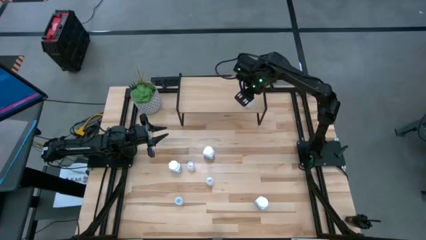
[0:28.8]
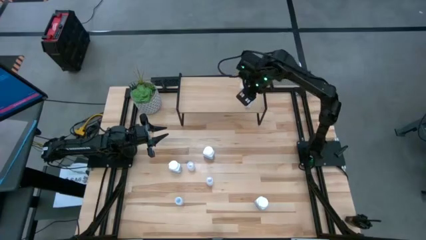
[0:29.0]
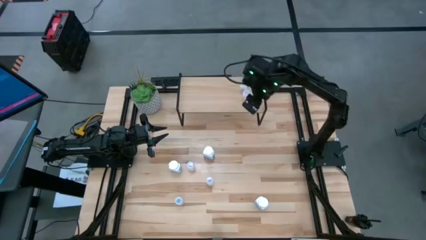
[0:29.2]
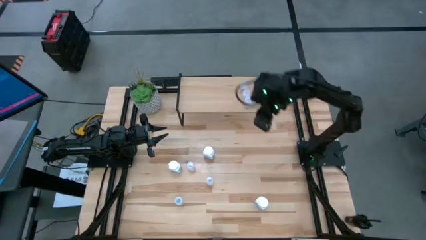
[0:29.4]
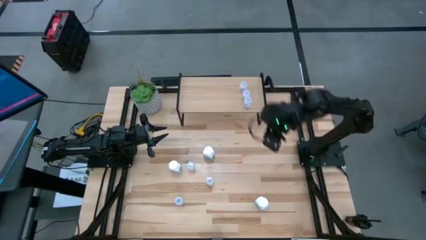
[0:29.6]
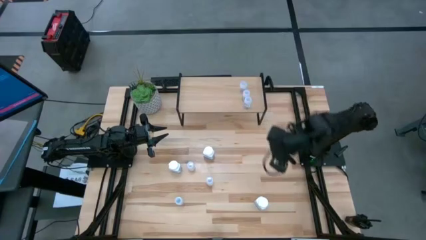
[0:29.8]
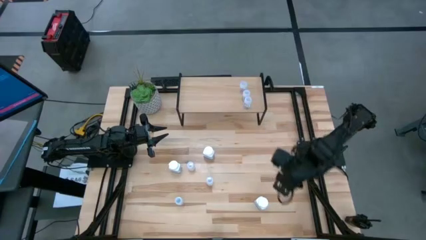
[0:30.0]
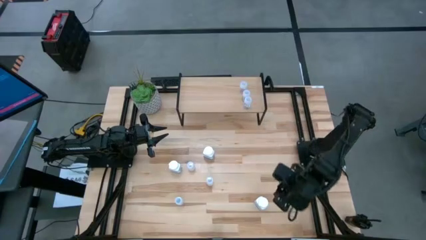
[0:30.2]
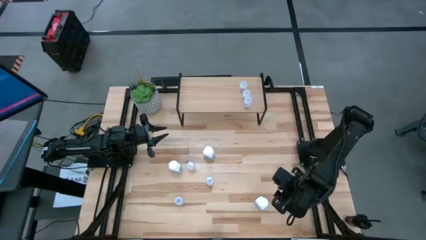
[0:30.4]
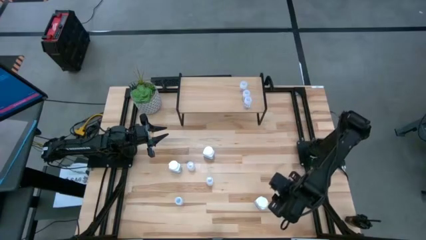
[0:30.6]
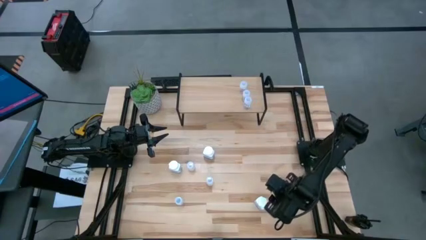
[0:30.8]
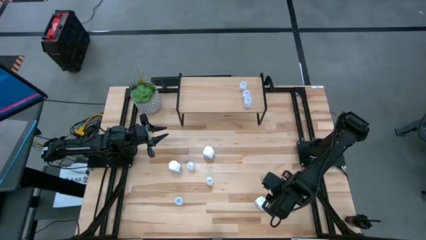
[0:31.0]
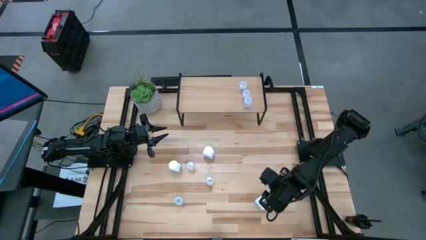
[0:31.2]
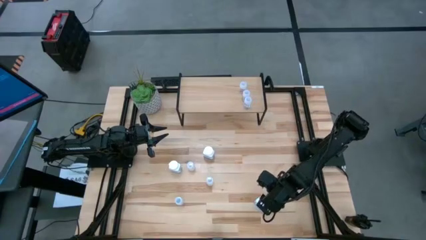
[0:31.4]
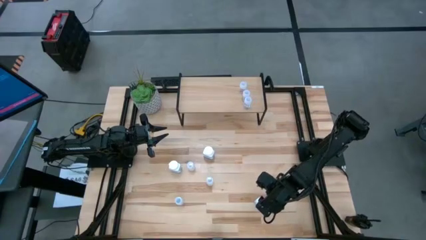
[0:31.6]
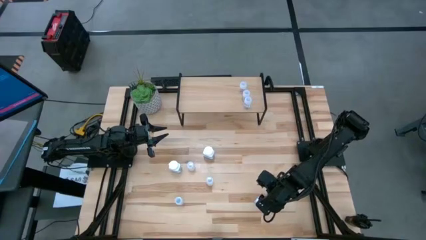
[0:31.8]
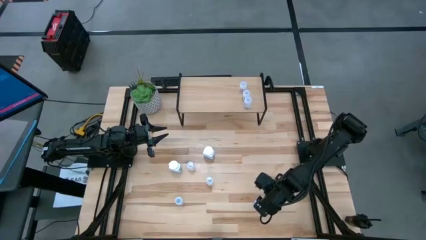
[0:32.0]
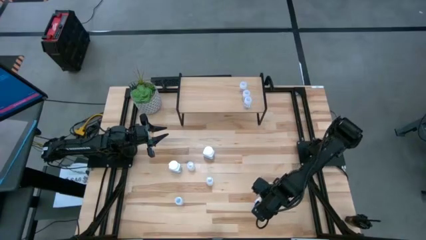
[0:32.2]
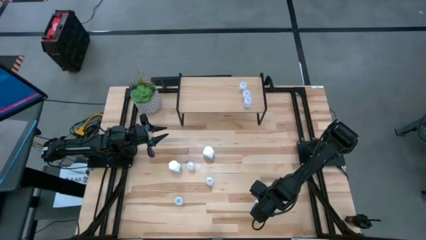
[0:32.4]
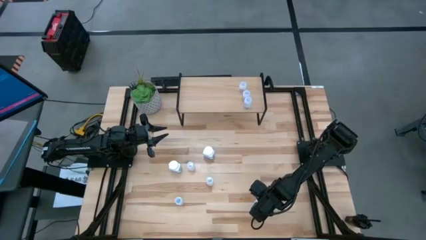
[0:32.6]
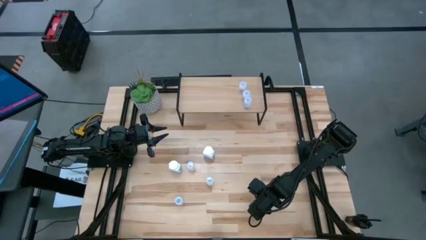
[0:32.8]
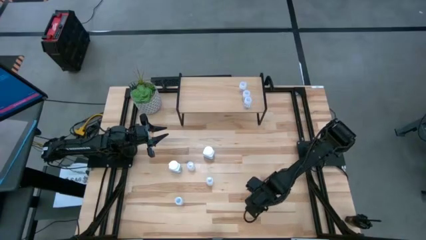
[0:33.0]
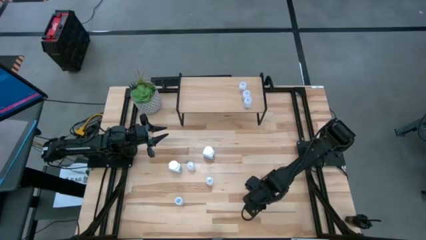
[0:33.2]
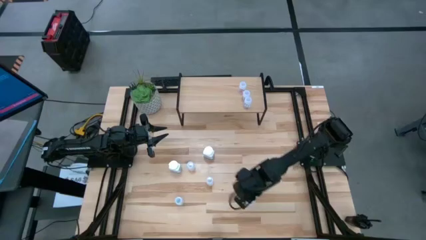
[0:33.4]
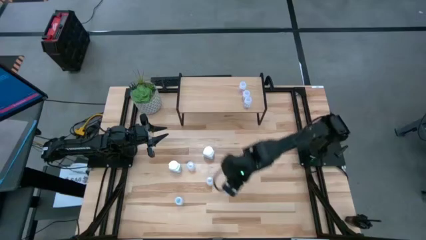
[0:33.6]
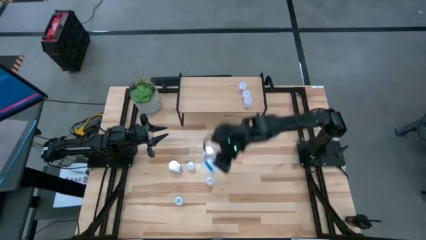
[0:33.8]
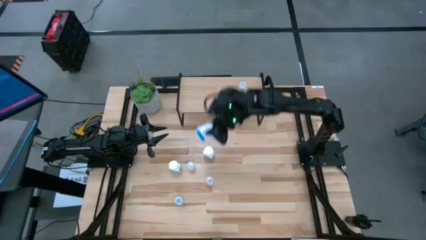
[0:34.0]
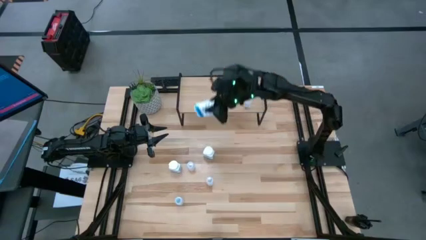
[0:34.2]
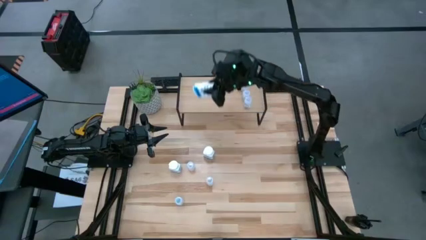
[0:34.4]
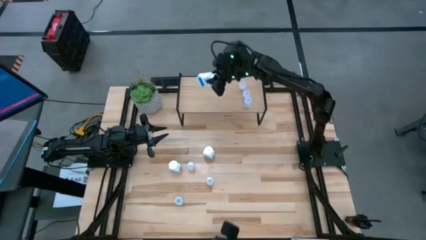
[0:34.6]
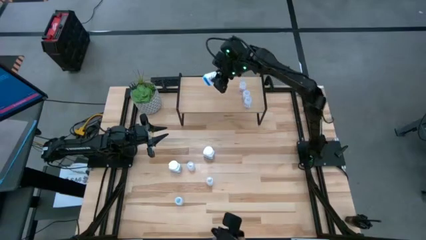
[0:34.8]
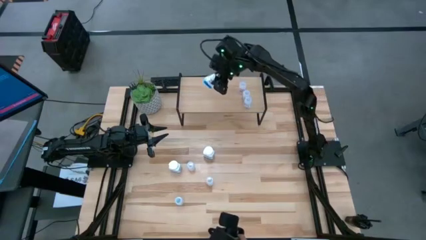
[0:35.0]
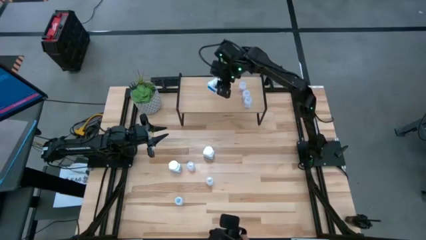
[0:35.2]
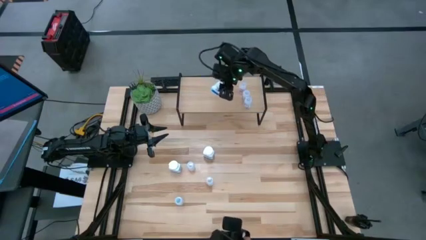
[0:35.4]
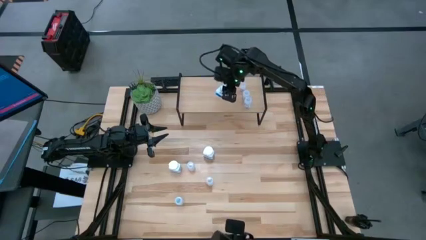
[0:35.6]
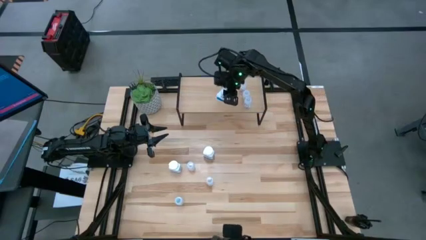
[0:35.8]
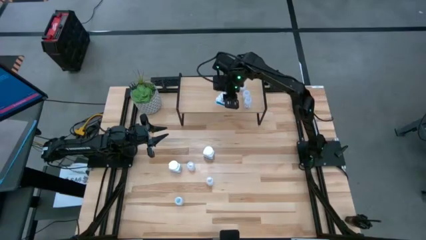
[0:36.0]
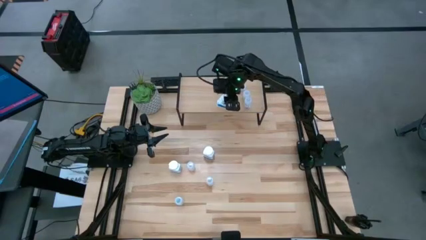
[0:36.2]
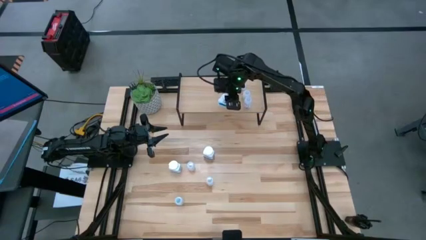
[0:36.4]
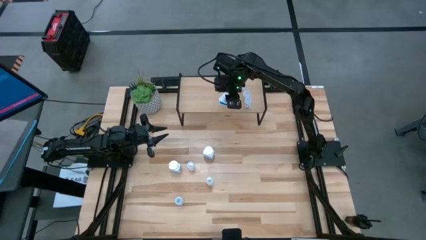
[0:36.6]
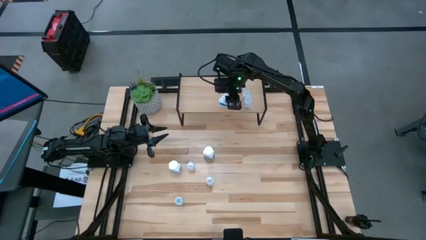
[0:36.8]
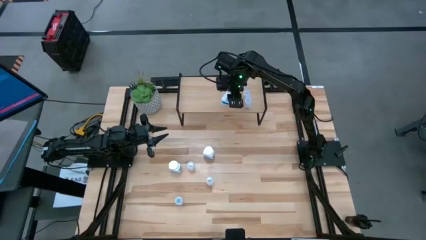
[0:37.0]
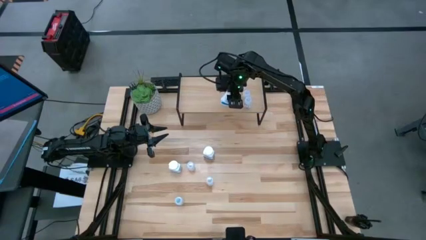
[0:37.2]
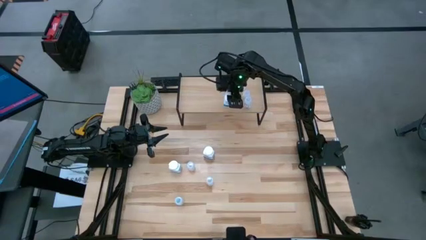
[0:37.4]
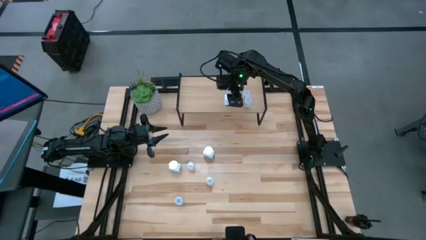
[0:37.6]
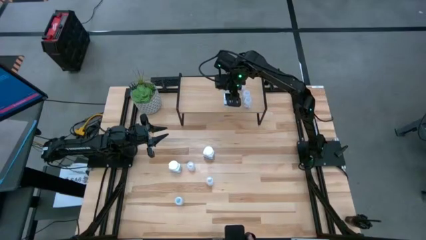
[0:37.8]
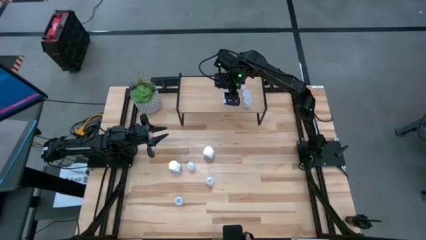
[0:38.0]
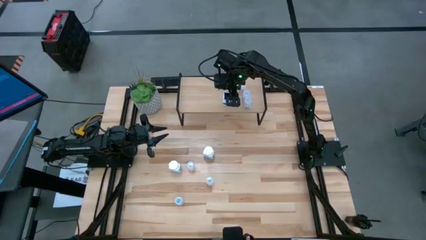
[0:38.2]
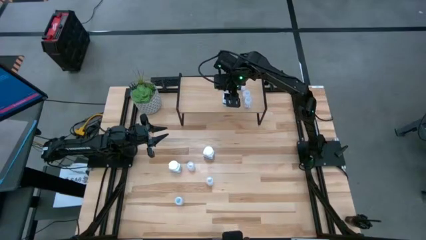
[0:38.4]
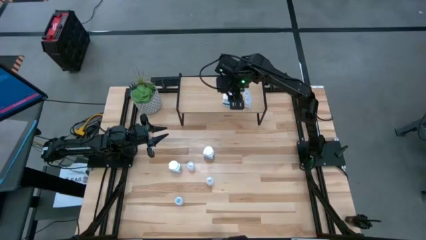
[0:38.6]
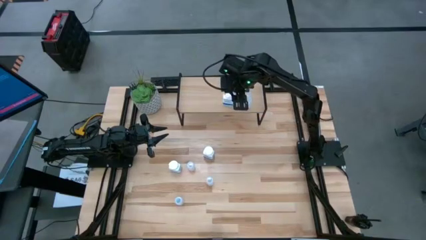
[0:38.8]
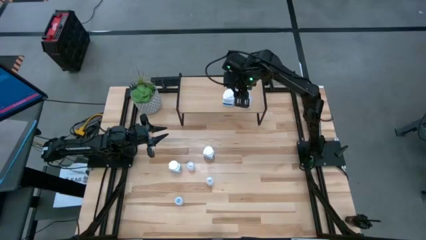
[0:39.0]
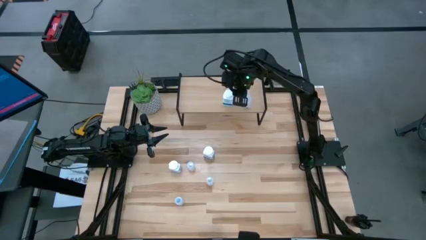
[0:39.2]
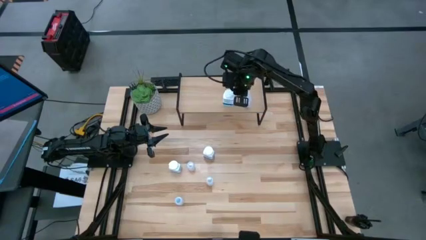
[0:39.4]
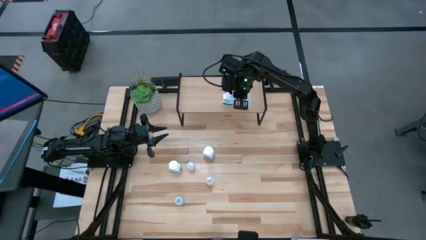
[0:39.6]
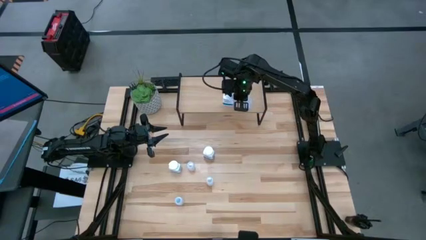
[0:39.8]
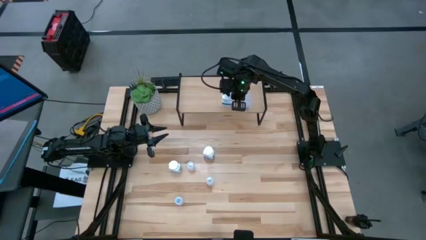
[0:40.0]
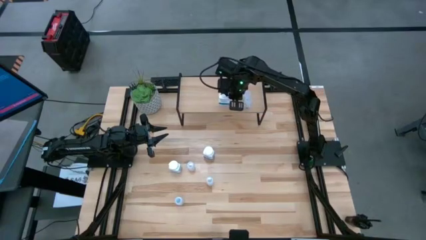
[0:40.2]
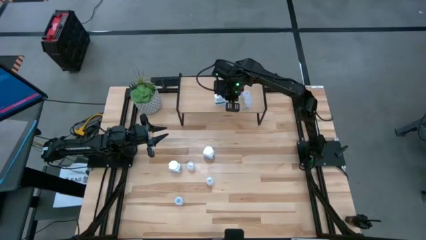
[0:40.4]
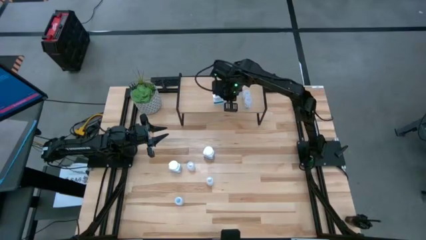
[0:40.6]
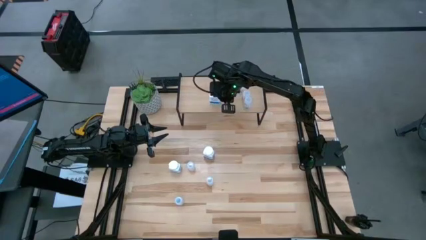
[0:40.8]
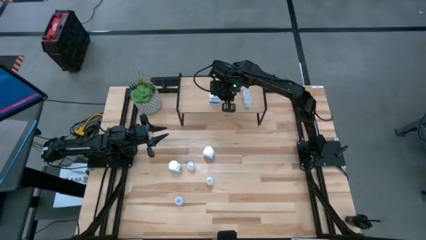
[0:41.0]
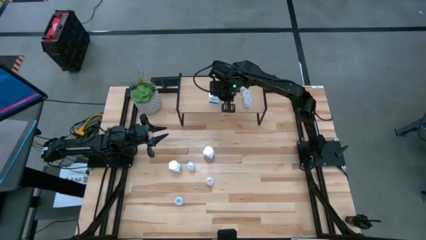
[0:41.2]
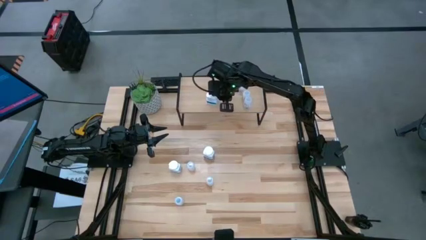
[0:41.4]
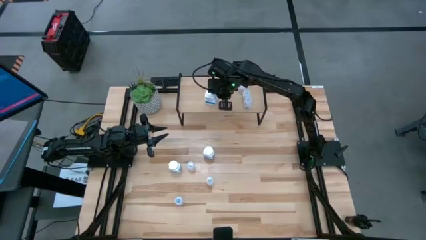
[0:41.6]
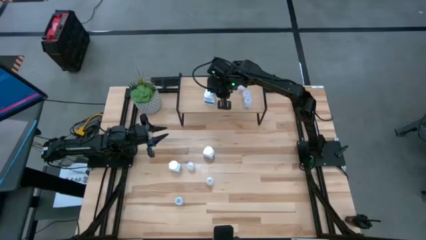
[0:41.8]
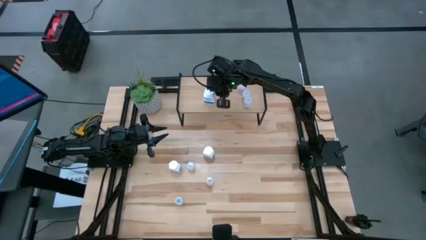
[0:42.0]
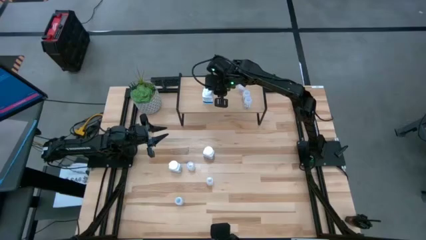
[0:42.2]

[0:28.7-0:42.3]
Task: Pick and place medicine bottles onto shelf by color
Put the bottom white pill bottle on the shelf

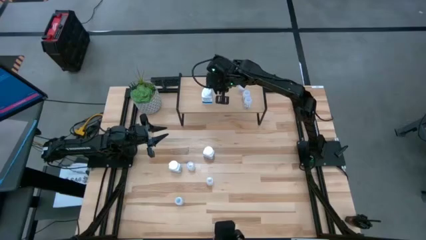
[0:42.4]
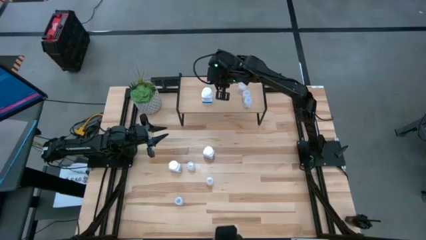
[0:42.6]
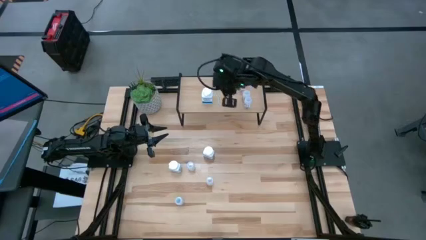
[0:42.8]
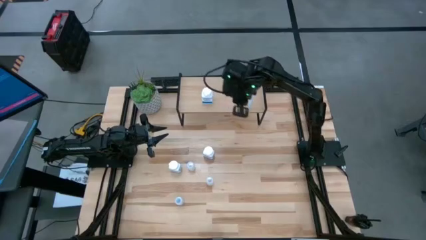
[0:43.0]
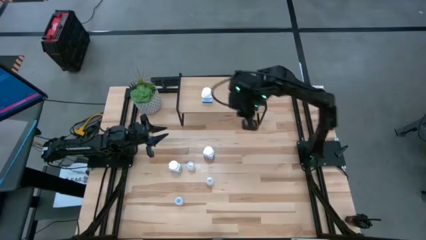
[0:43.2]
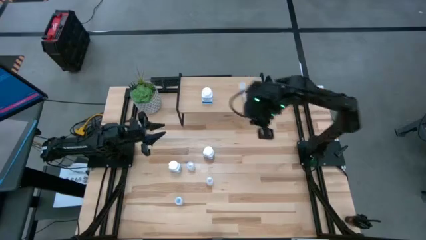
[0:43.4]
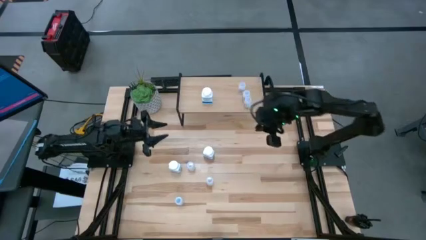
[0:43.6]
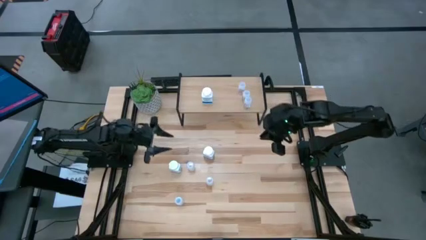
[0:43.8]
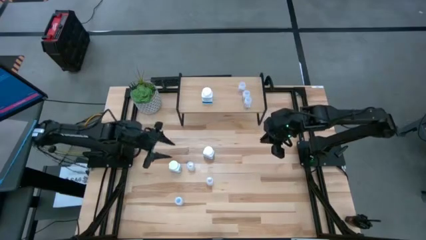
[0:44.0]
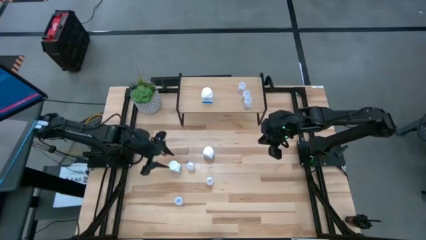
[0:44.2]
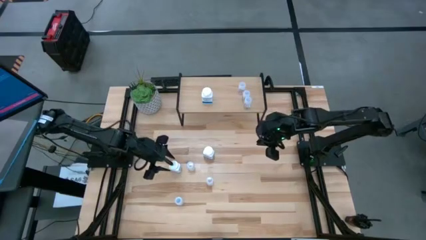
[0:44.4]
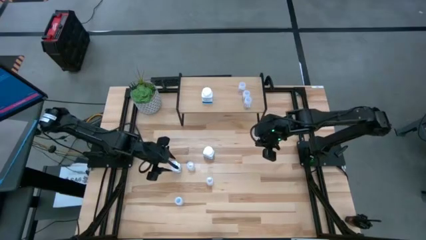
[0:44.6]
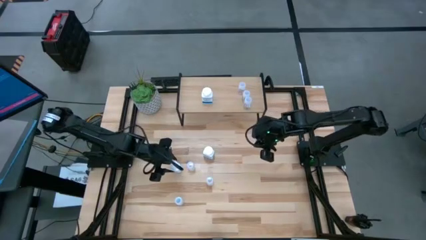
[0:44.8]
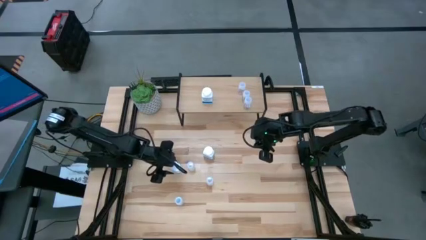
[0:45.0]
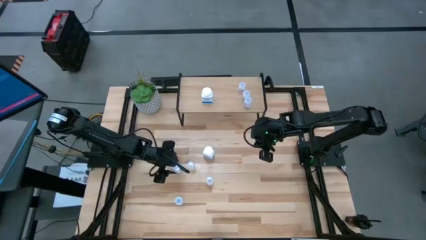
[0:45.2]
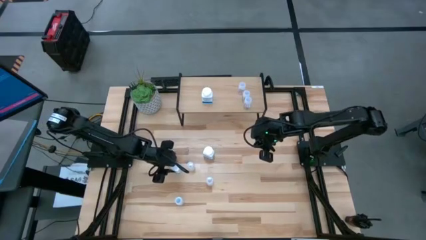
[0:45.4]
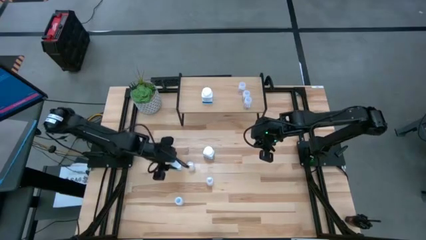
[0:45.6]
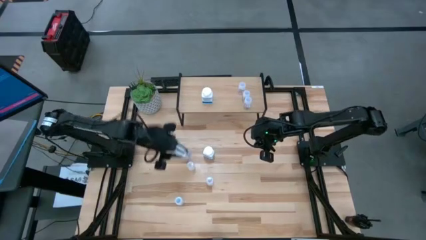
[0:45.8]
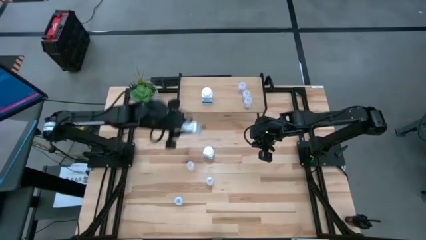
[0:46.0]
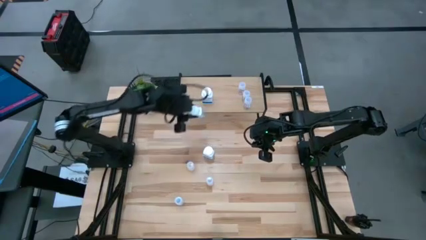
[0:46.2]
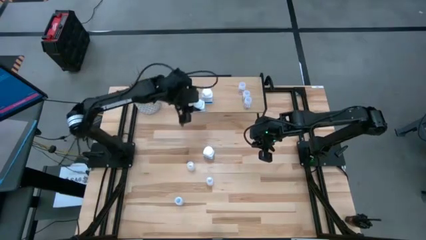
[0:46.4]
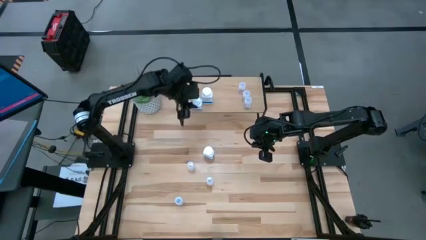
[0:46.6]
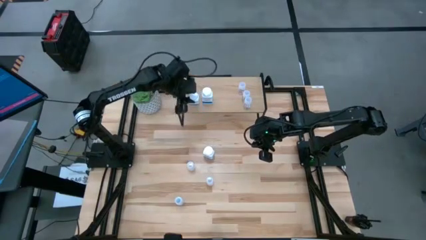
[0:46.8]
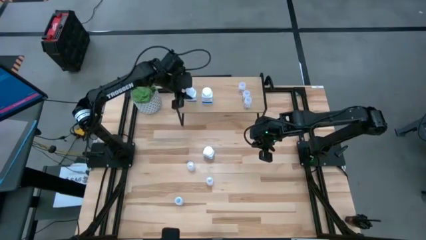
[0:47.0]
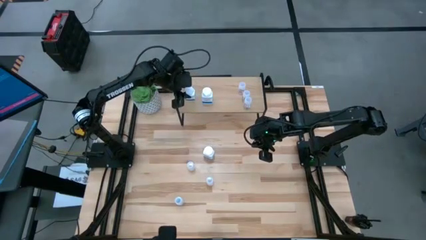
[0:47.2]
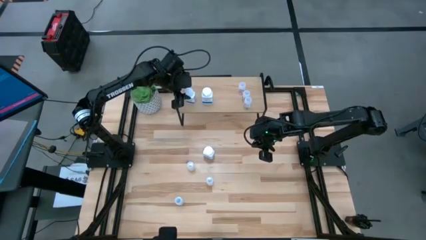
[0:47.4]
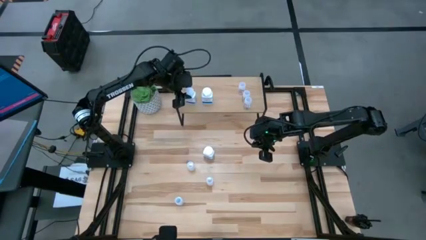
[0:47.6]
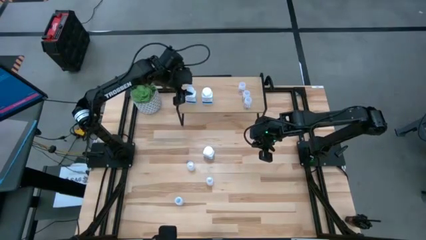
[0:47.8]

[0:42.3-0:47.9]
Put the bottom blue pill bottle on the shelf
